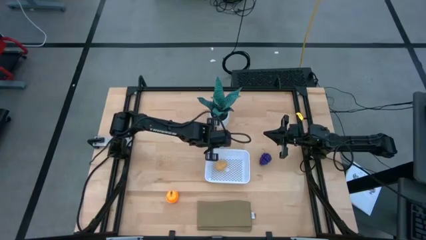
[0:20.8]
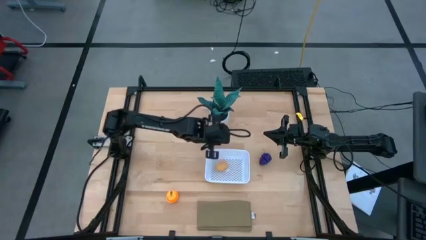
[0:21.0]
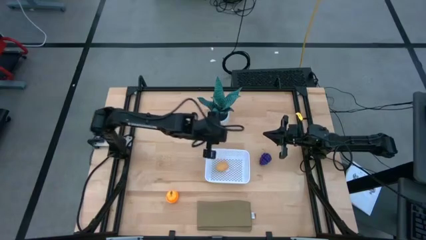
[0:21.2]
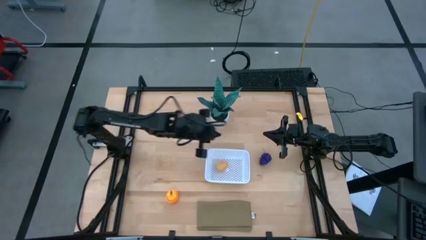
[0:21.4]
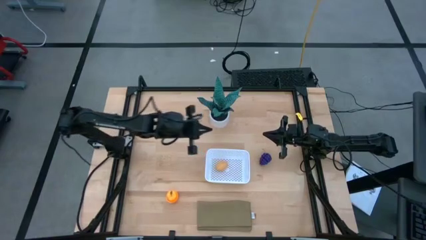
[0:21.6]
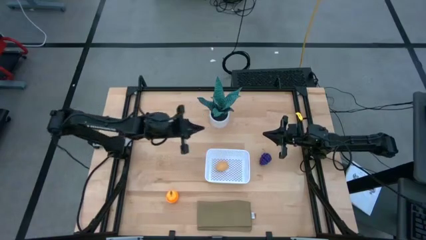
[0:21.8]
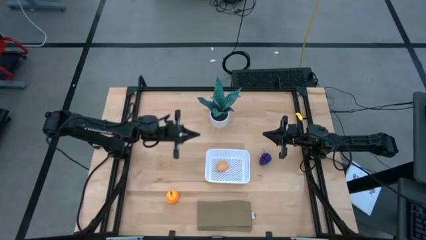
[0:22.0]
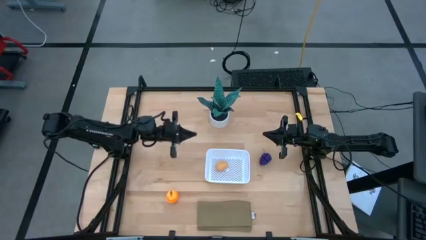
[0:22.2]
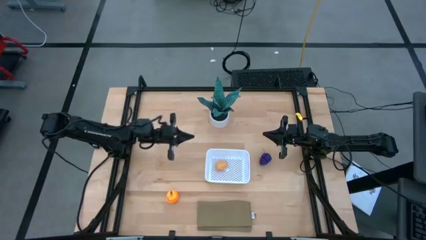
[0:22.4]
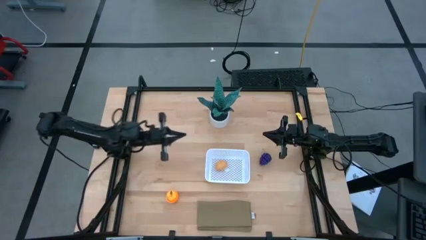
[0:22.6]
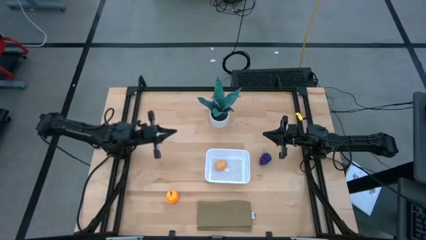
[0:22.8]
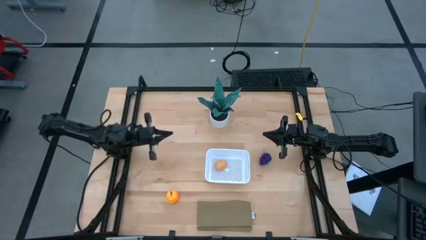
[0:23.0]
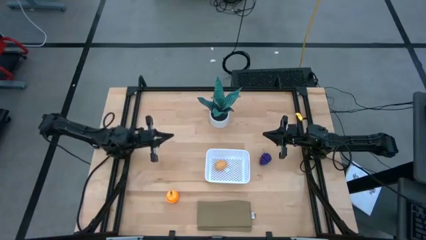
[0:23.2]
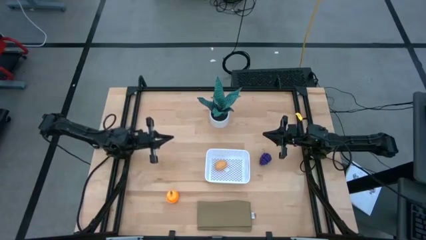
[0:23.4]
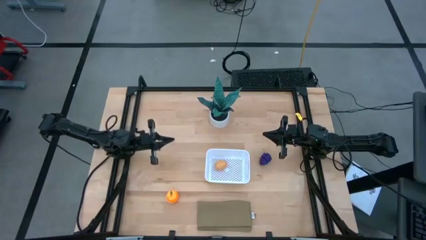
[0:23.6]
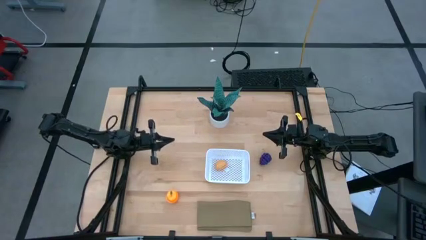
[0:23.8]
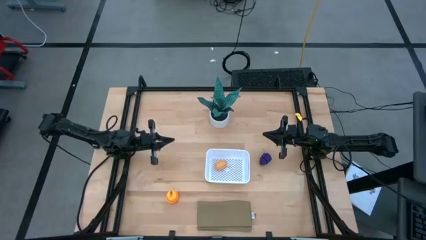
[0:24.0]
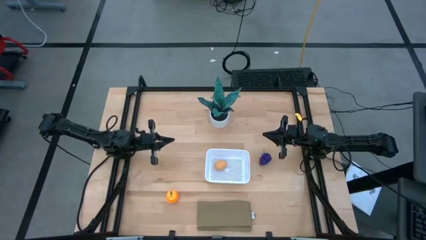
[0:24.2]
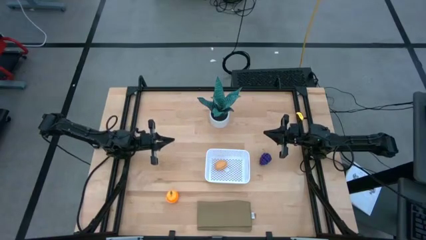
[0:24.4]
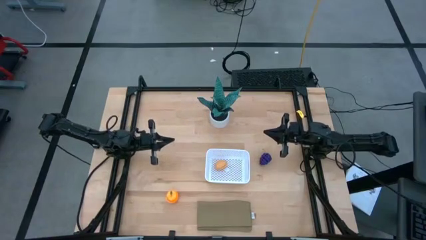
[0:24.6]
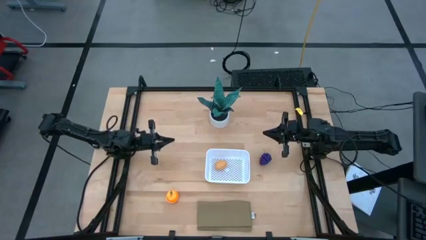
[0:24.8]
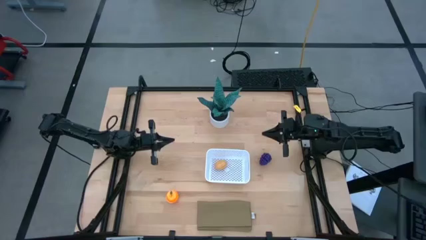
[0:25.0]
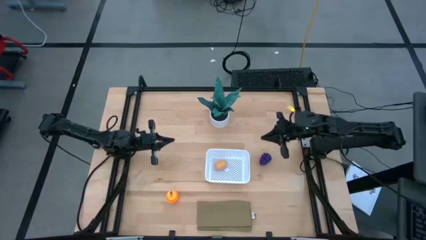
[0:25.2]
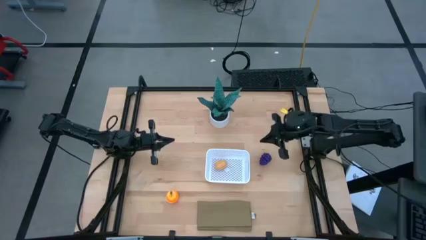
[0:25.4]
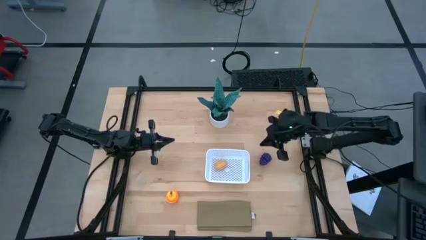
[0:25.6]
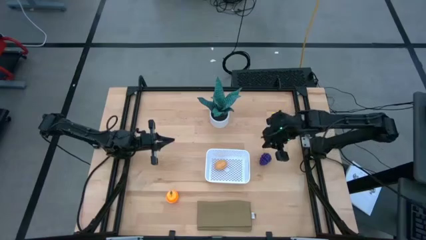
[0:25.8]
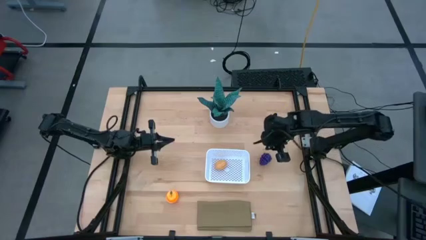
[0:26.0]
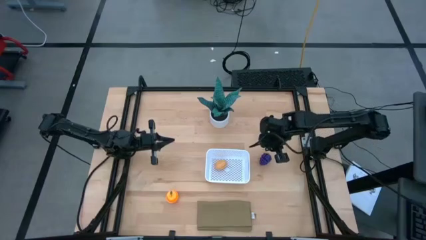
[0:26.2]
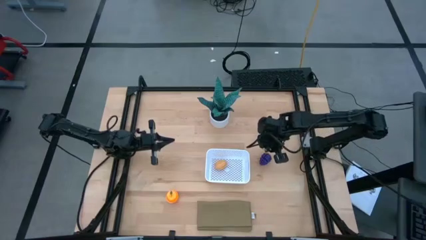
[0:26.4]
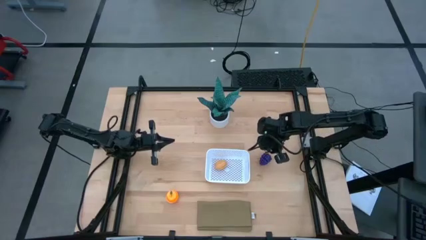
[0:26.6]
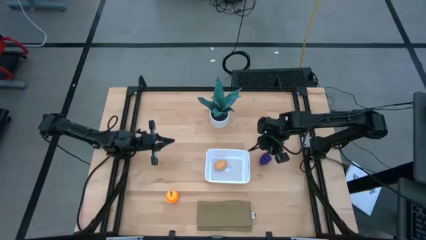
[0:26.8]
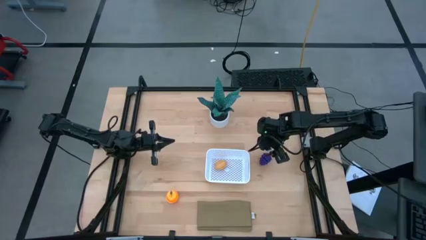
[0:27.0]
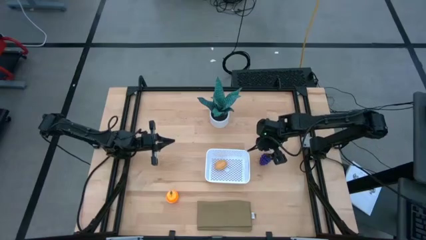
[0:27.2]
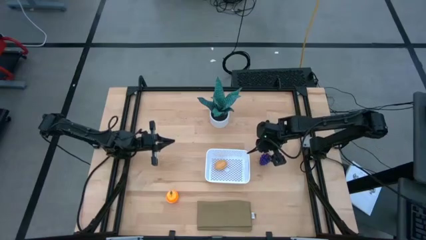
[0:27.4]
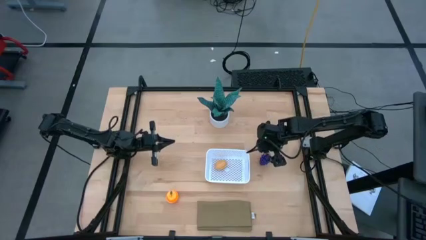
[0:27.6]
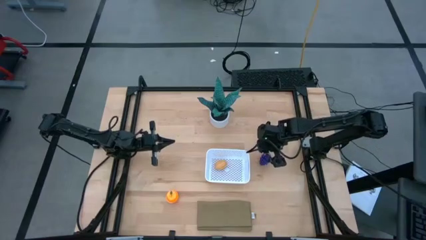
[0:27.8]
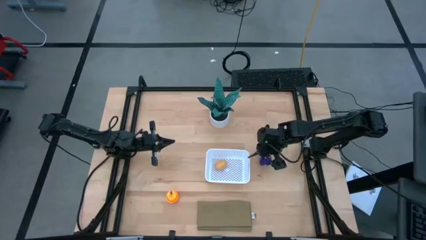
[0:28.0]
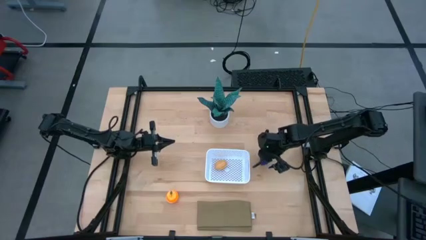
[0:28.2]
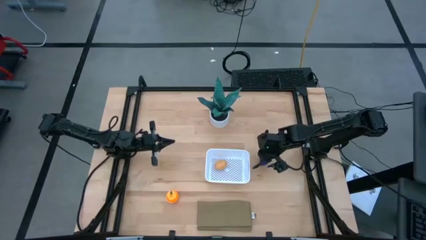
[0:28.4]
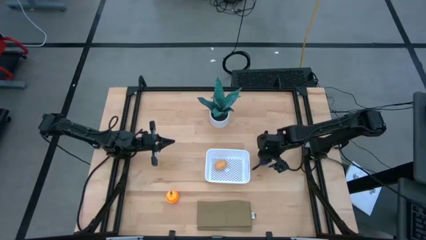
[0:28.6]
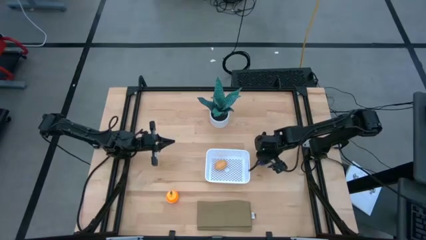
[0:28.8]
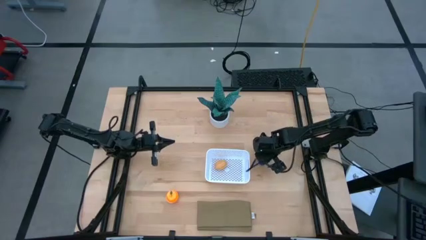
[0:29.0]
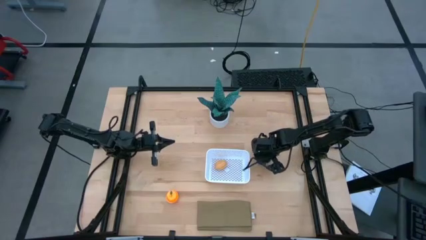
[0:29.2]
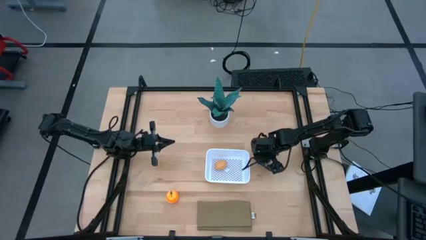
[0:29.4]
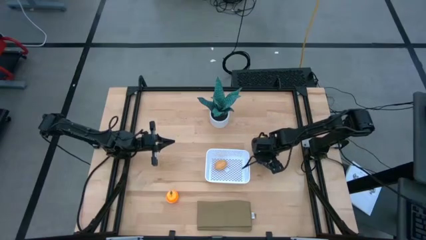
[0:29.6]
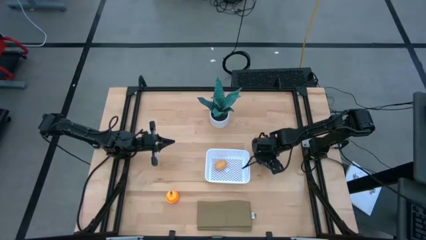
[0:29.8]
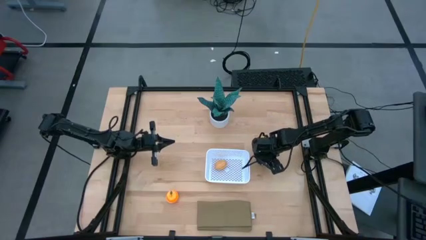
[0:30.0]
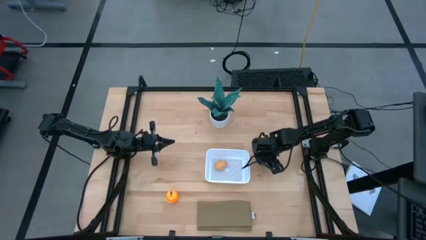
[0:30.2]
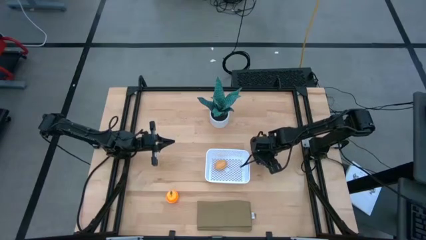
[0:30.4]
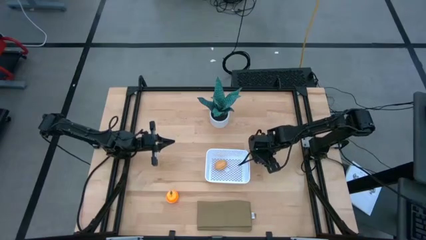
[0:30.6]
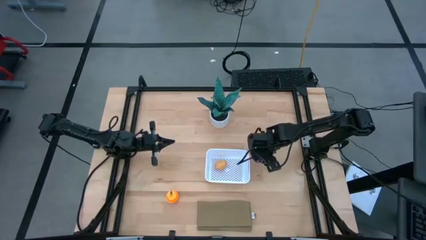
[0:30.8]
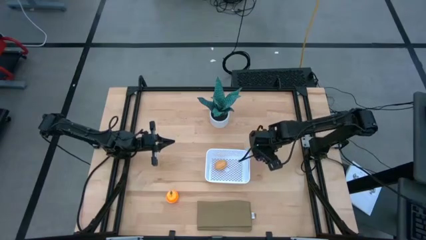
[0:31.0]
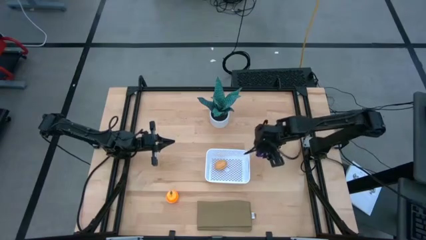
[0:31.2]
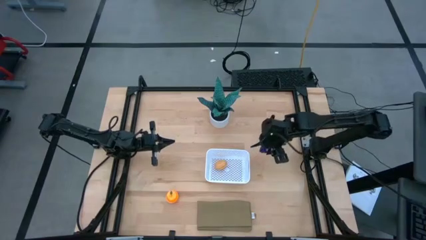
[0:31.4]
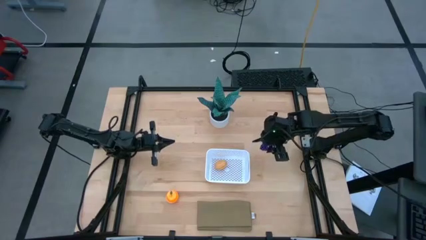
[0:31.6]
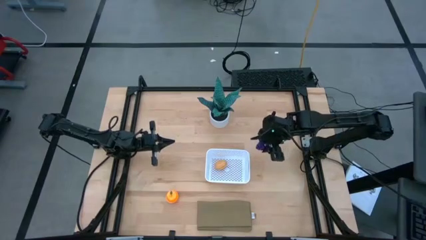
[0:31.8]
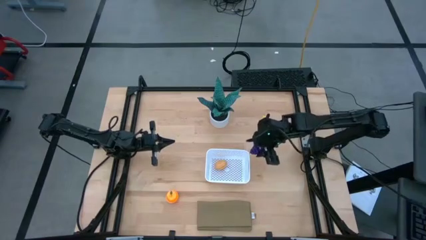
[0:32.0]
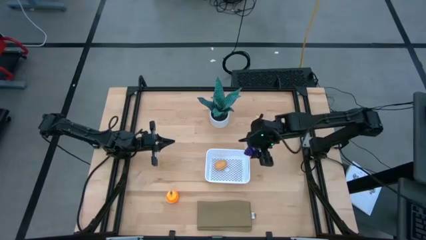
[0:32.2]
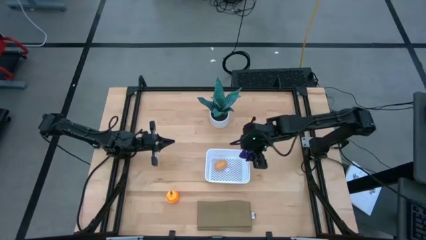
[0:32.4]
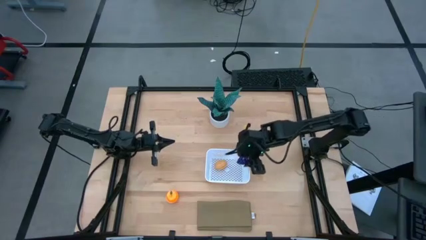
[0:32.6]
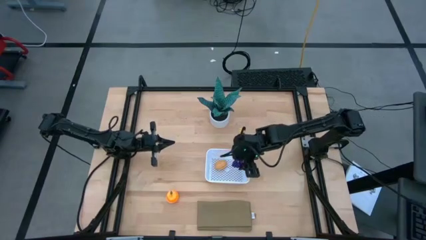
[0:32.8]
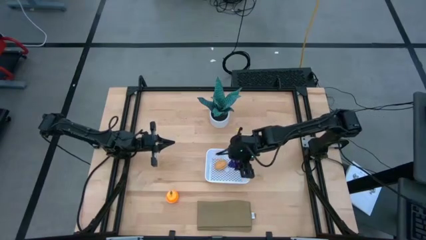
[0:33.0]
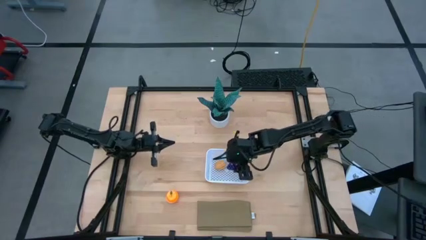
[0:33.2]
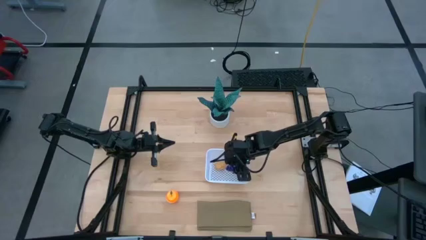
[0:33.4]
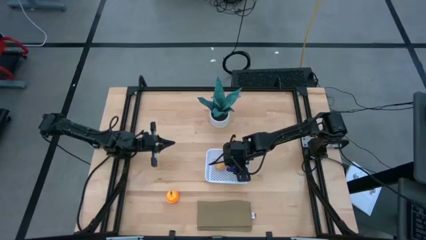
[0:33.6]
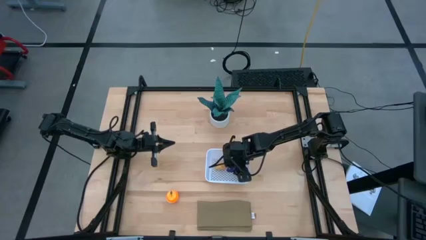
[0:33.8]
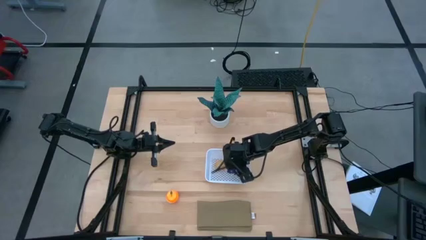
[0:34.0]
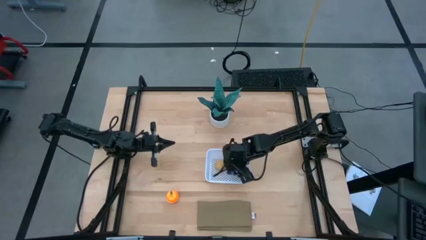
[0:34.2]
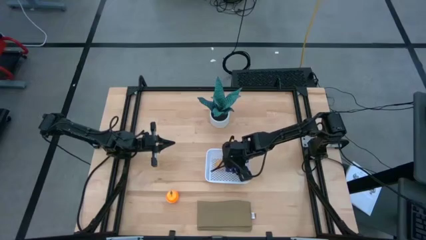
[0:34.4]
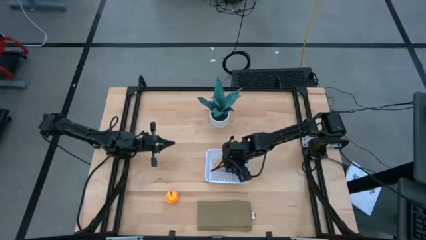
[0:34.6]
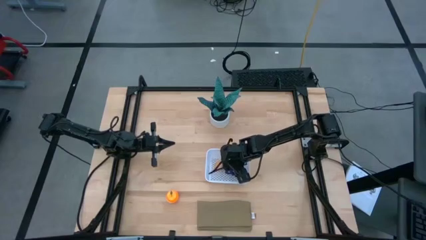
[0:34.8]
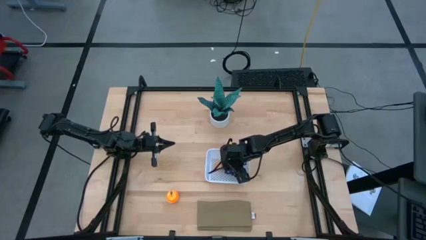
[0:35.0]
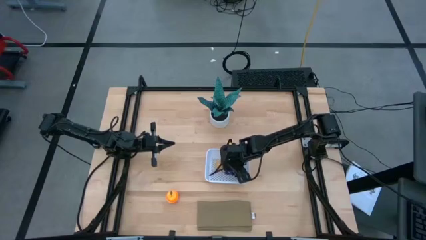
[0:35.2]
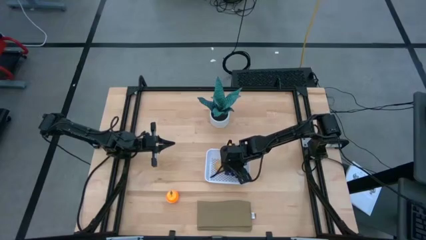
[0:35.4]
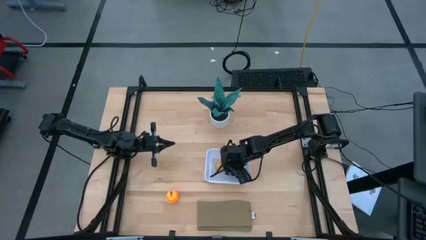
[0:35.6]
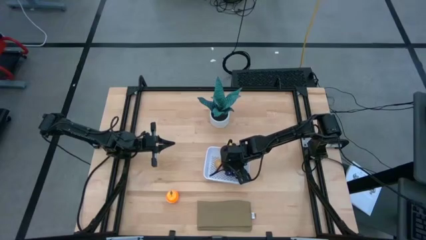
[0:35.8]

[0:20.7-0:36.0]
Task: Pick and placing Produce into tupperware
Put the grapes in the white bin

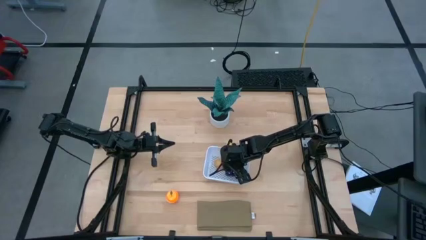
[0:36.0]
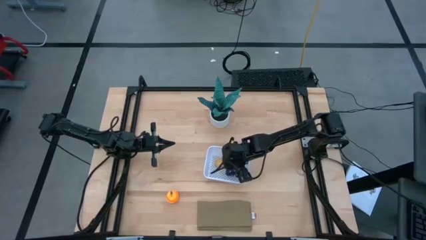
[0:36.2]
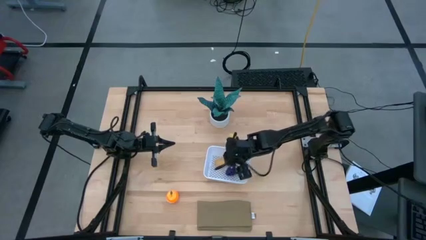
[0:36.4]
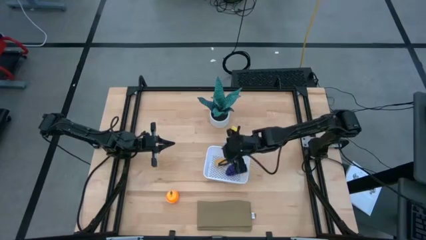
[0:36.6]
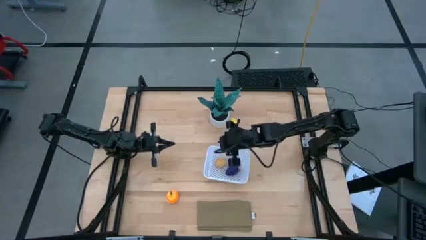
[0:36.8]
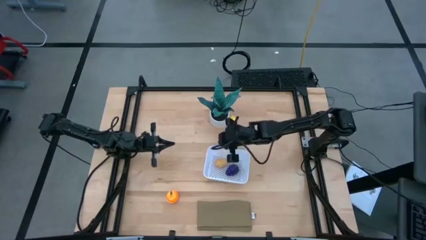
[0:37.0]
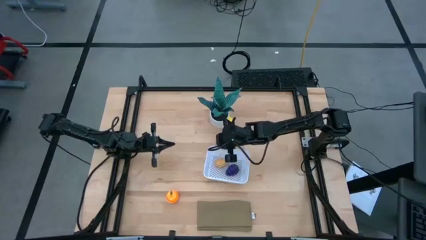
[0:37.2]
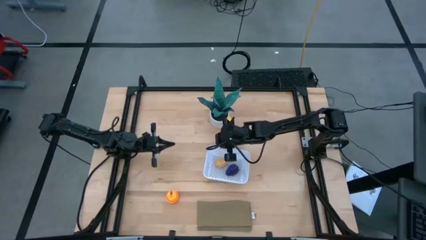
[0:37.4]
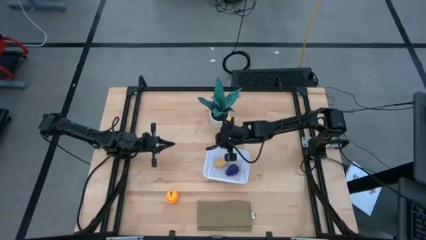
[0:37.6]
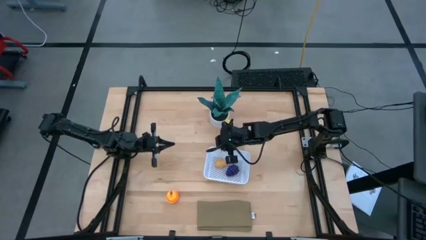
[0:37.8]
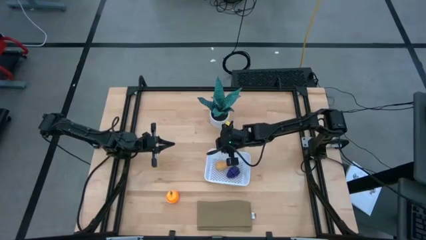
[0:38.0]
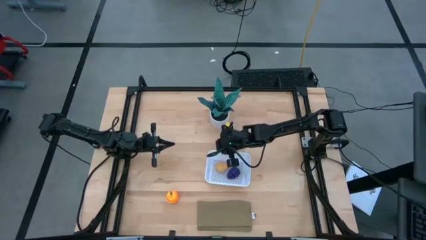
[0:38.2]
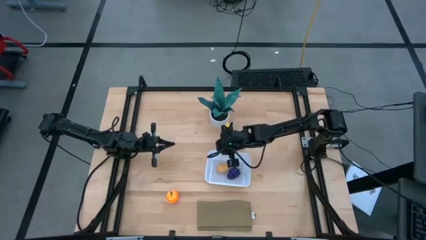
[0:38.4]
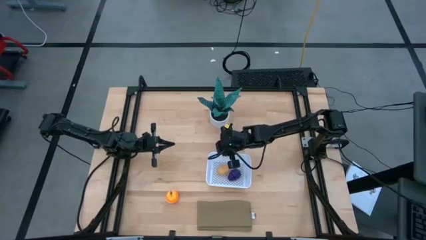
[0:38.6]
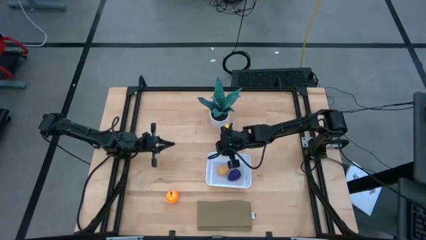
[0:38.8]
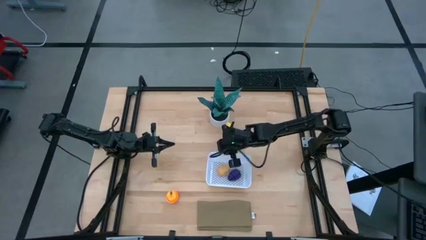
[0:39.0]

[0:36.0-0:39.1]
Adjust the white bin
